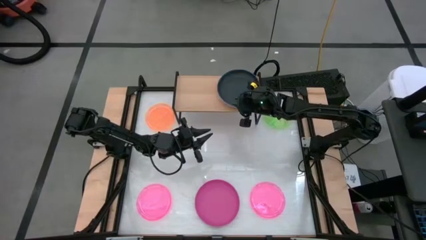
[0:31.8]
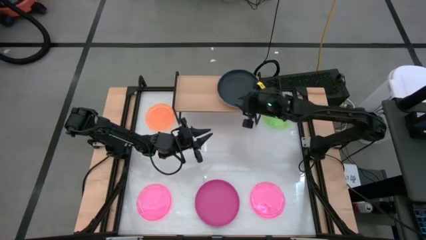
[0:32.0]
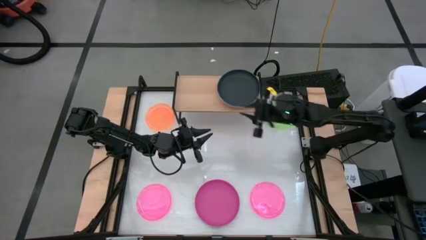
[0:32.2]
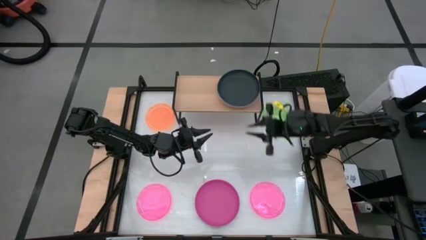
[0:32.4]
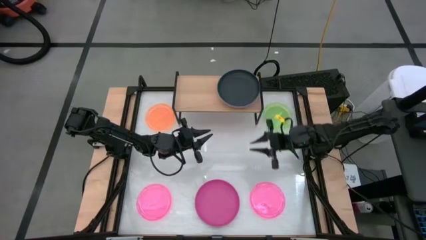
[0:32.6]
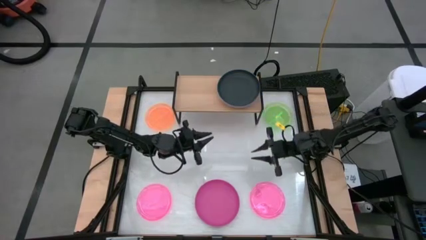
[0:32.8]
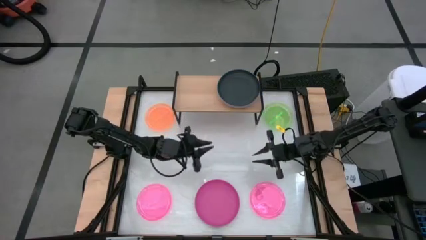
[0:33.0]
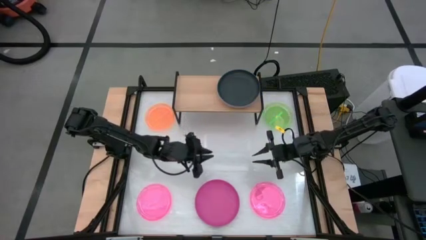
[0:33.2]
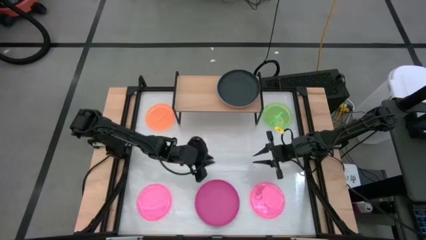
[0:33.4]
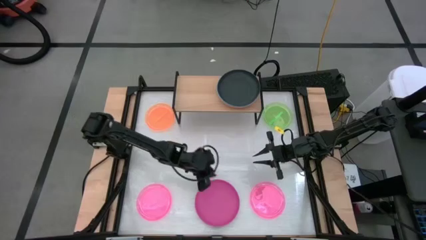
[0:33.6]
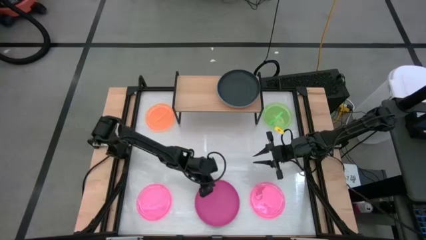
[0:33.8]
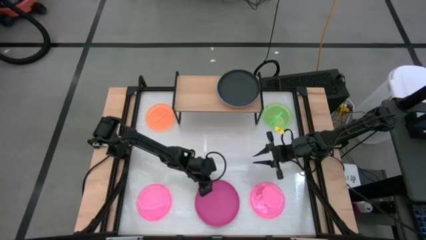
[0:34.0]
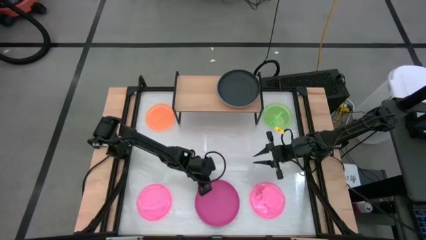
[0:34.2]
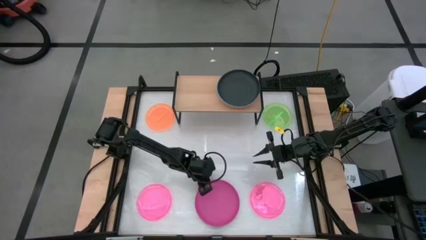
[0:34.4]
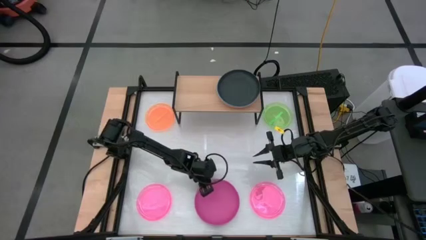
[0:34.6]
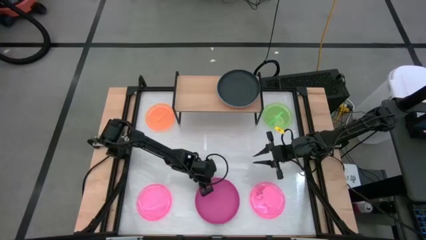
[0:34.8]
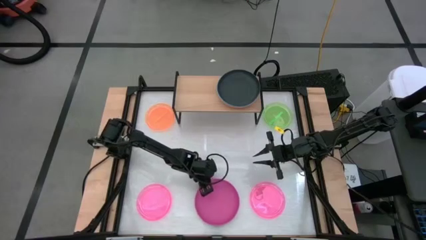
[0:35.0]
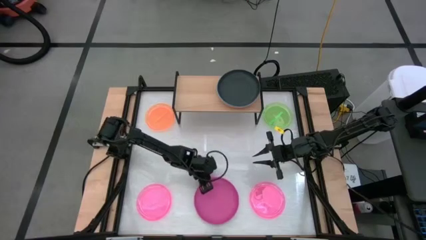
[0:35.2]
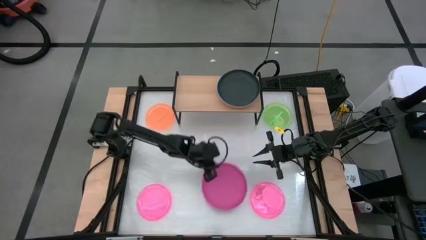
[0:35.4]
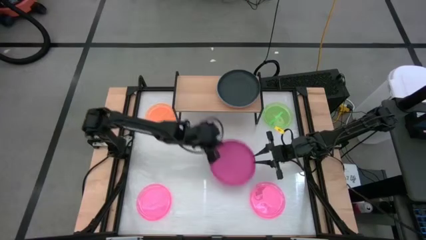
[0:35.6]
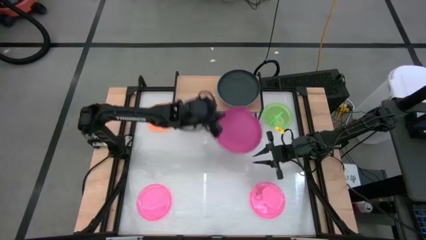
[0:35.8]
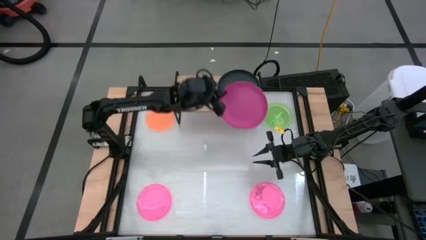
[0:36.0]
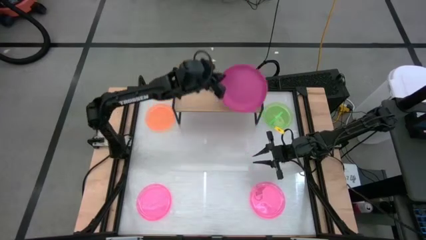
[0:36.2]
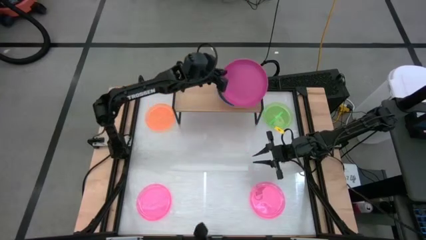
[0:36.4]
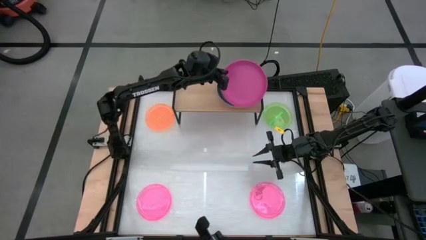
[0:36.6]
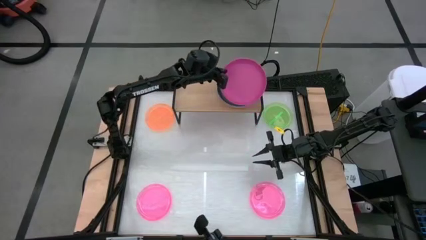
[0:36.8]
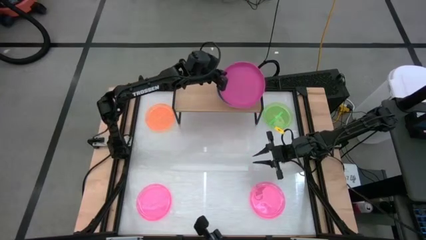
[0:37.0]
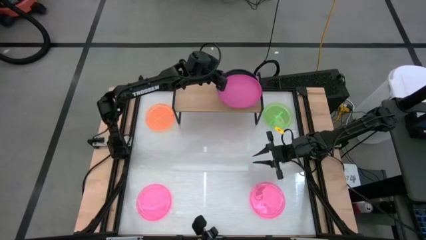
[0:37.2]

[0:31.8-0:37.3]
Task: Place and stack plates onto a shelf
Stack the large pink plate on top of the large black plate on the shelf

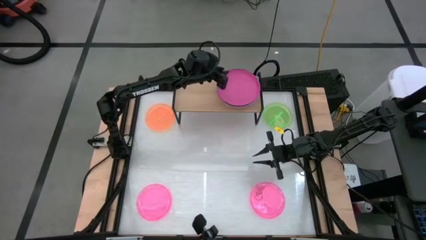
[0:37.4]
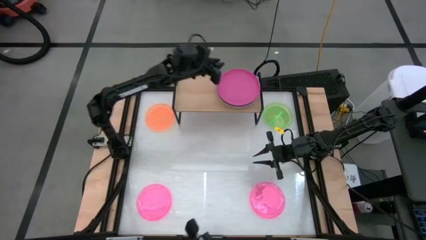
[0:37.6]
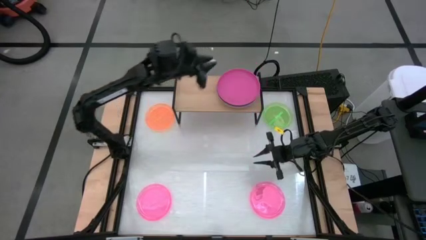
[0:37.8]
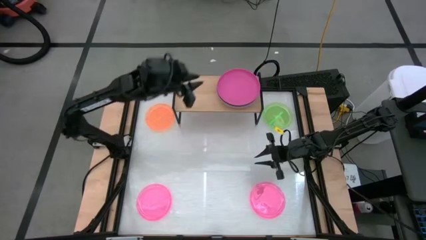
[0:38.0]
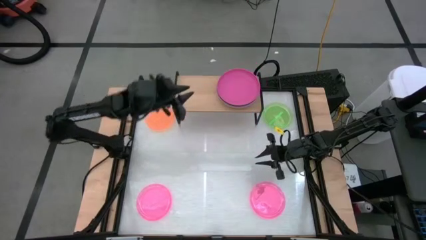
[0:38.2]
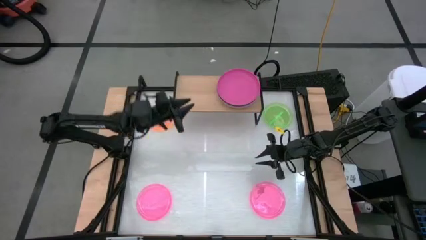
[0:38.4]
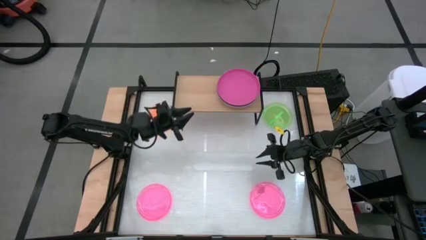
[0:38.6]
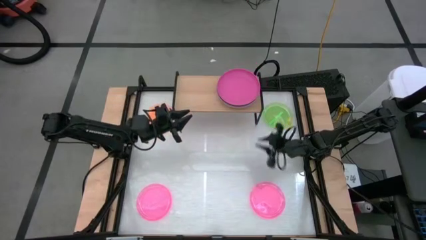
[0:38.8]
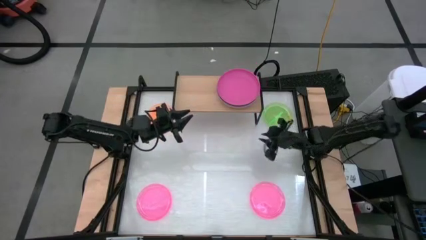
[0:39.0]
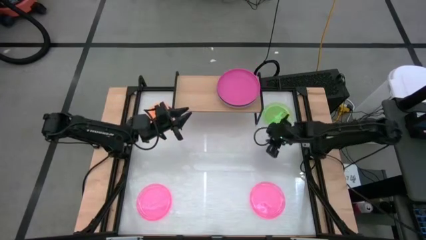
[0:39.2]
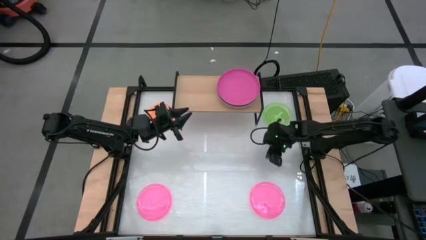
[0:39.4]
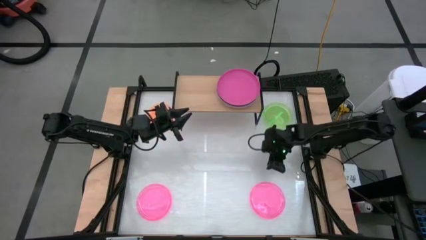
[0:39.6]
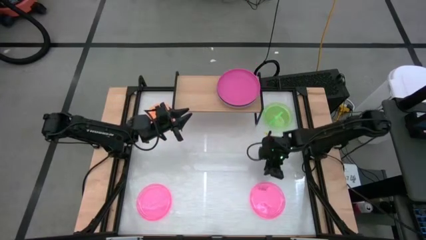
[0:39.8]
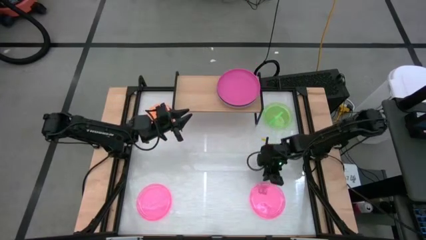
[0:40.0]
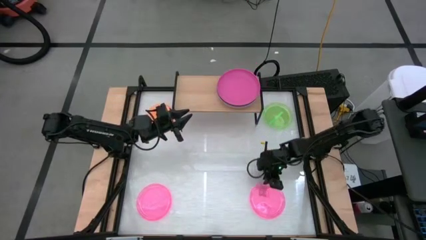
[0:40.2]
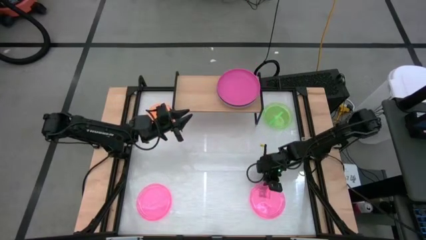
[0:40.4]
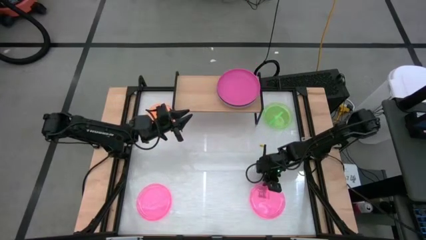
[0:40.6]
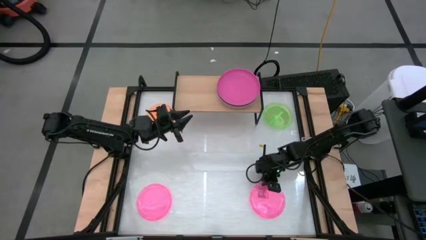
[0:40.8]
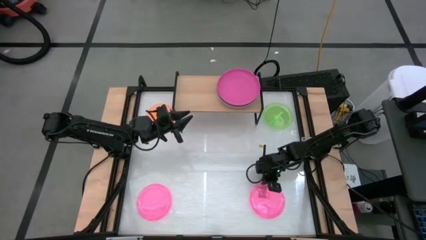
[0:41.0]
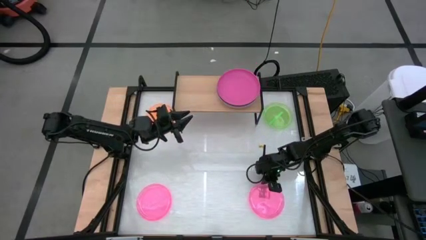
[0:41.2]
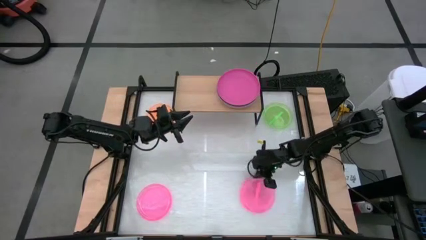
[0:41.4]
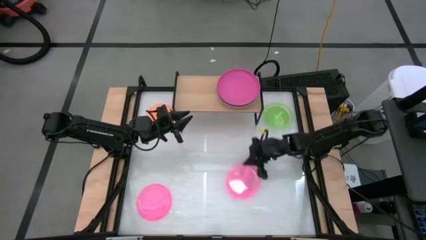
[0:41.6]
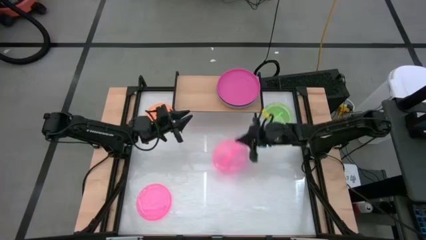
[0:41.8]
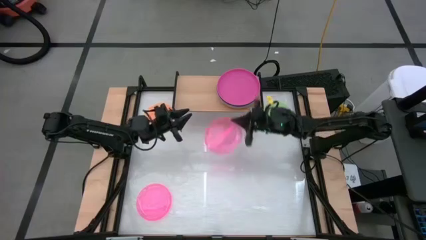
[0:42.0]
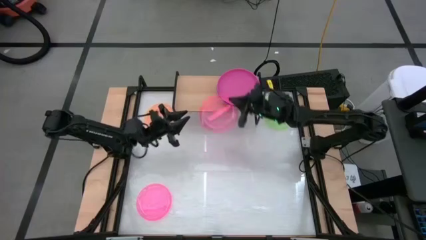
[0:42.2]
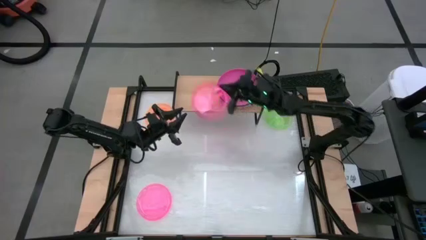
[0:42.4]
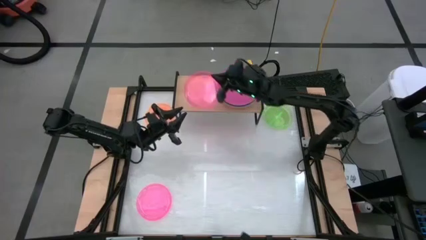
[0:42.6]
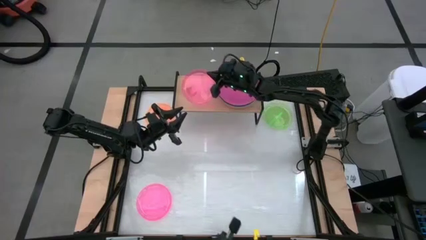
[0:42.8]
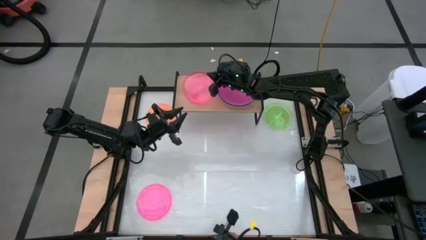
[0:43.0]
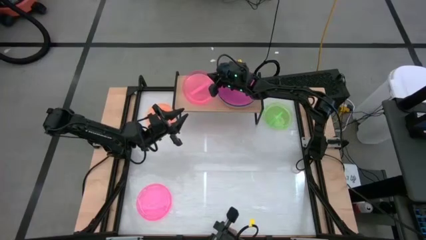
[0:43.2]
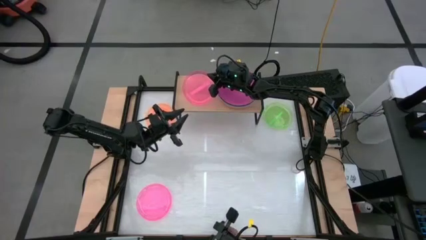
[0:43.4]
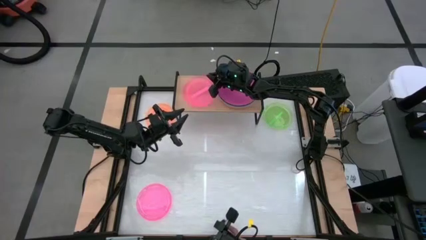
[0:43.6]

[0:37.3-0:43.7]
Put the right small pink plate on the shelf

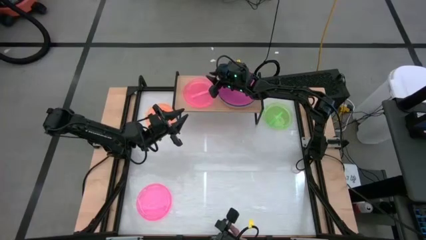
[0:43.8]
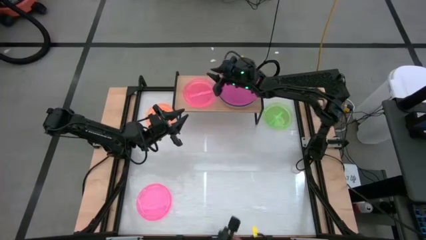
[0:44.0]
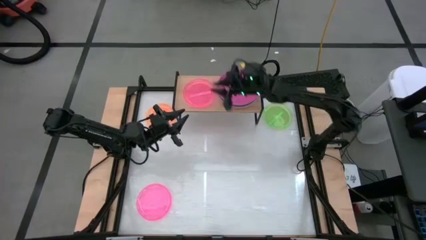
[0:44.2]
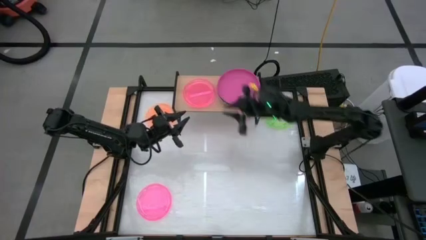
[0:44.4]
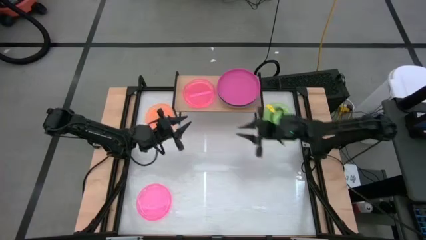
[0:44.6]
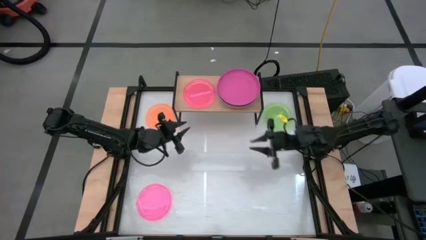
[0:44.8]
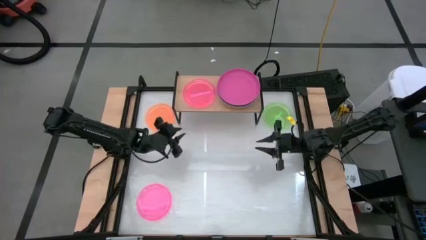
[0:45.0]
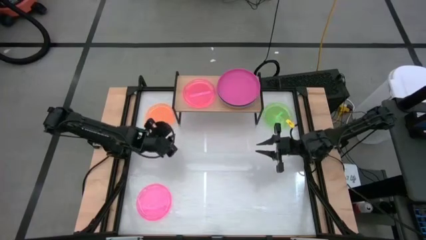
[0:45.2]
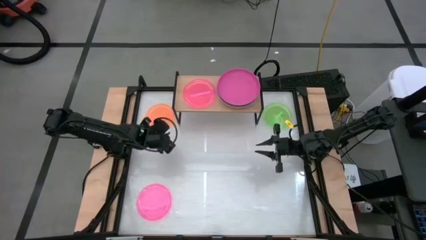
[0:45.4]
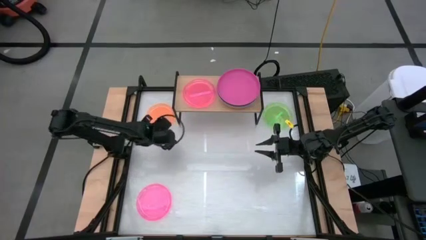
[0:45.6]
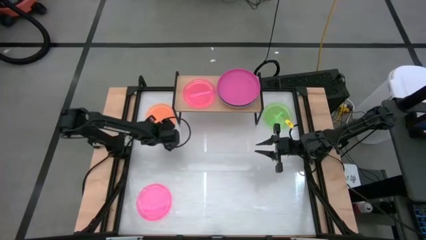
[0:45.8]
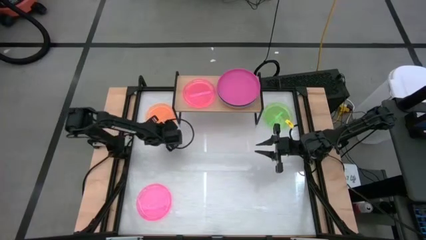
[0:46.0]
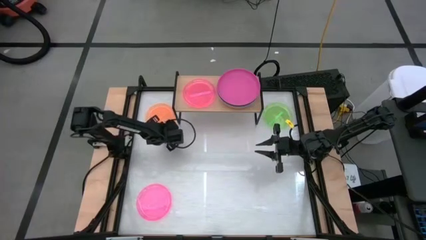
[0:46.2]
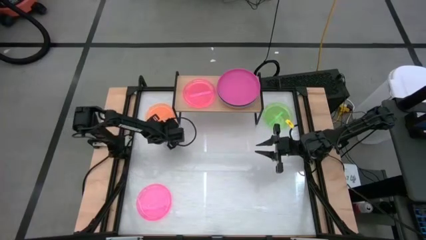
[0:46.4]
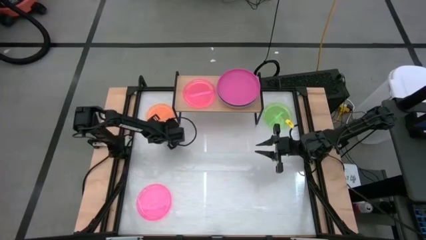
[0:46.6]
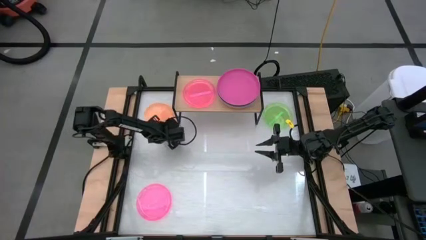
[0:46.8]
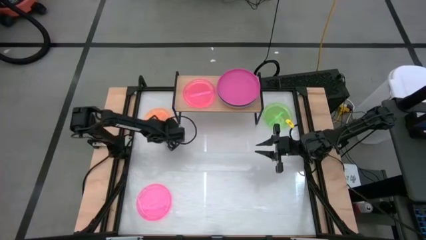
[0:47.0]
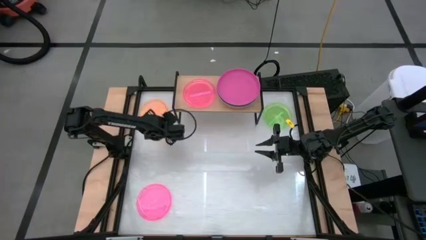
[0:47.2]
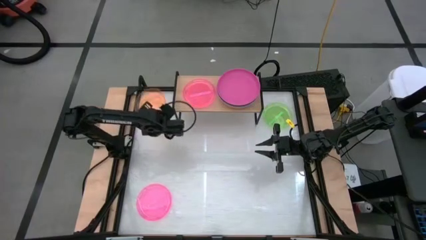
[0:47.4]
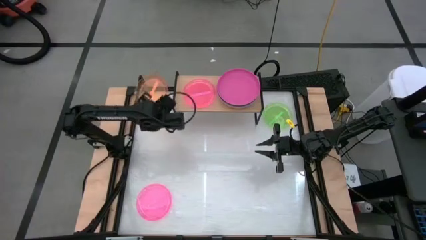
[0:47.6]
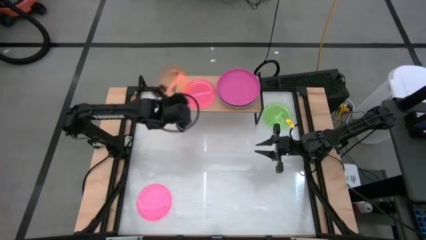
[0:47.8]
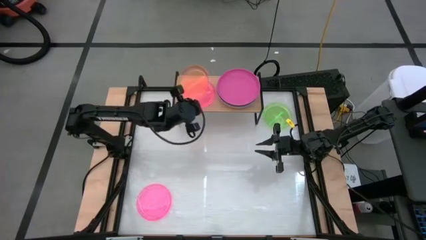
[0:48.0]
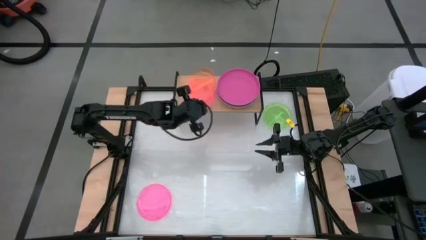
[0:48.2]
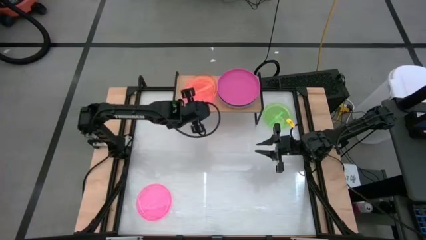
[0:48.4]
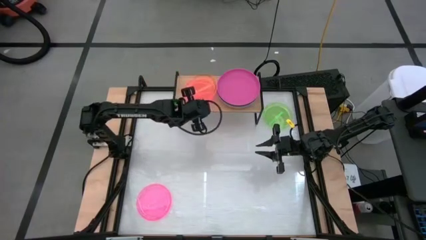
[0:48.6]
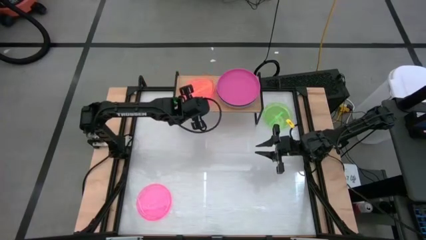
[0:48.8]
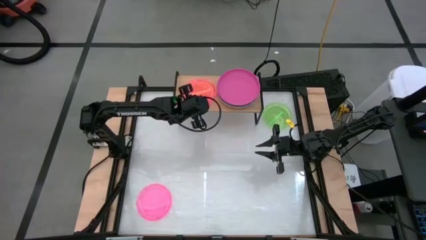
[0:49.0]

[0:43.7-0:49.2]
Stack the small orange plate on top of the small pink plate on the shelf
